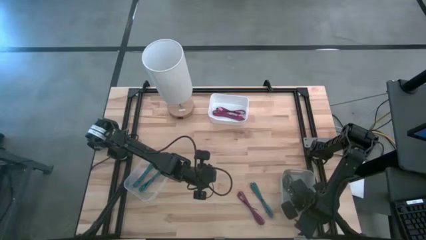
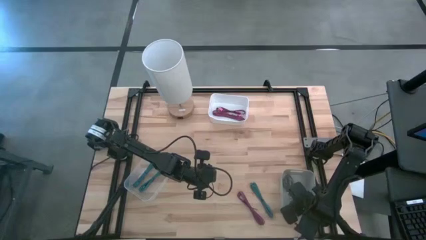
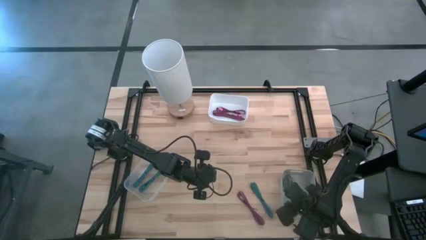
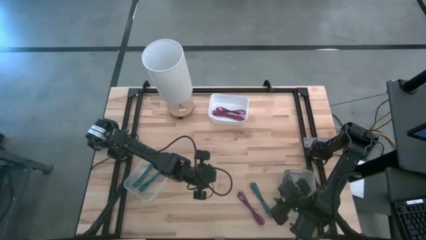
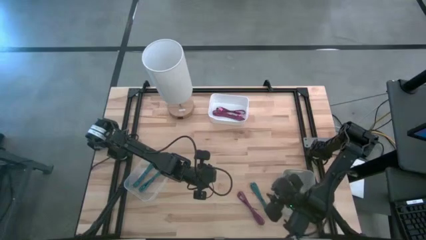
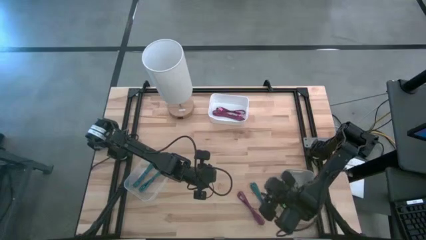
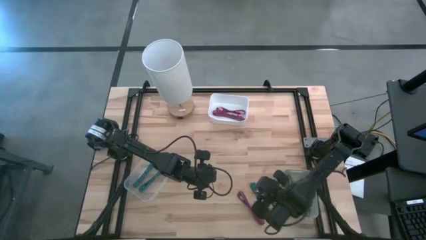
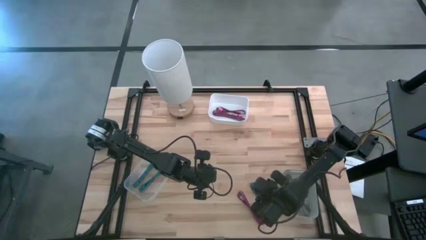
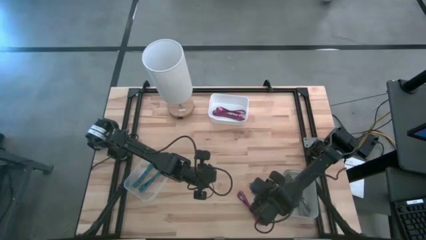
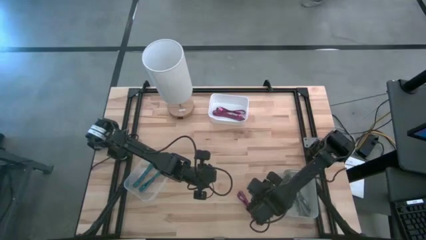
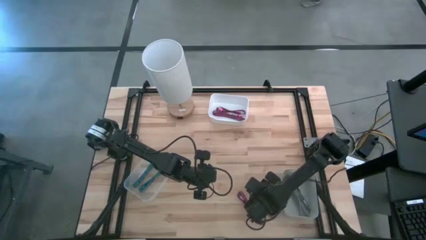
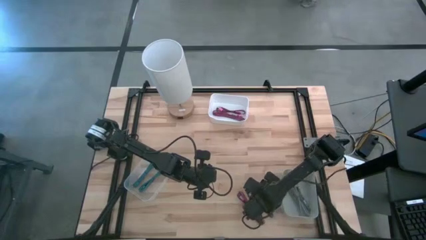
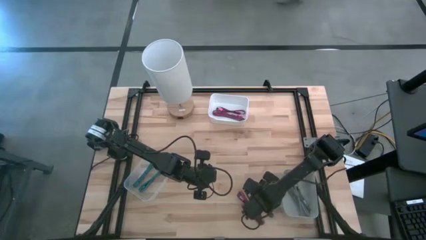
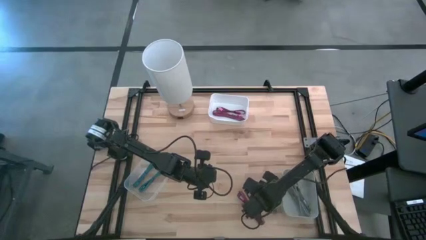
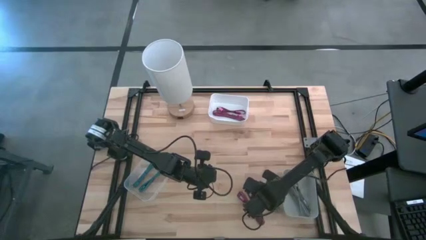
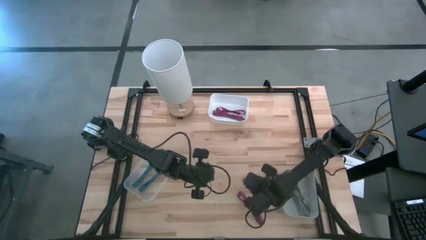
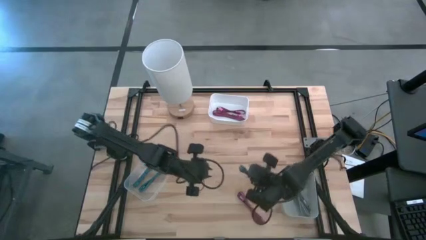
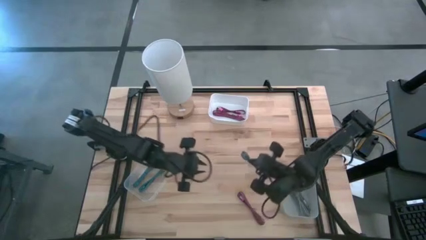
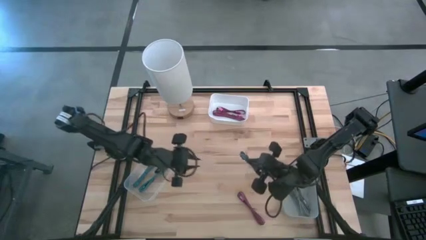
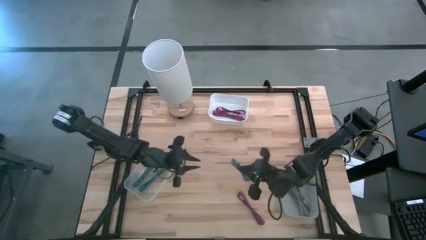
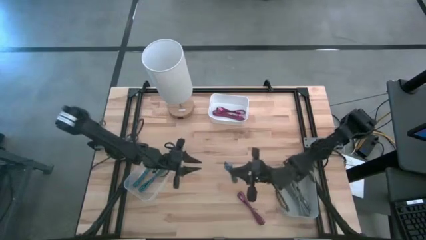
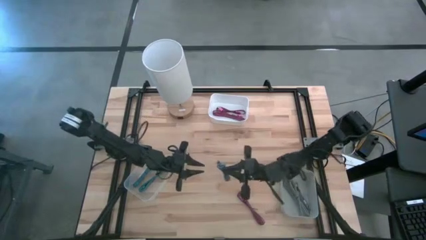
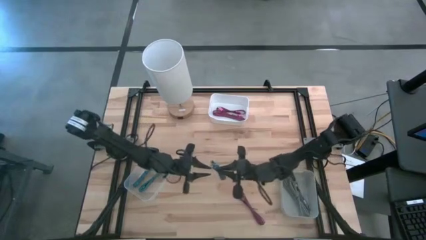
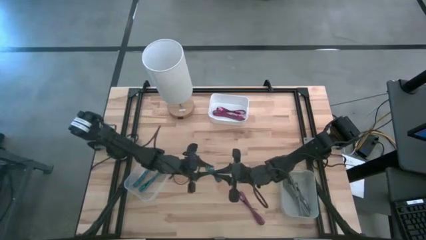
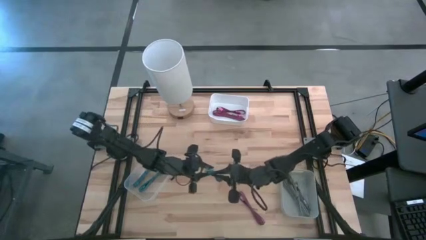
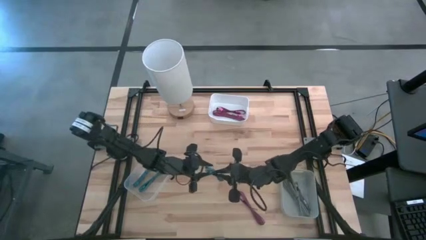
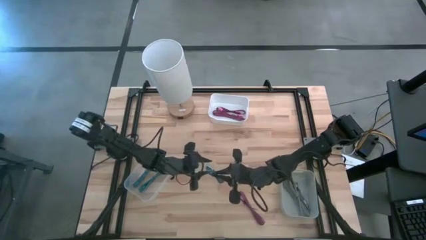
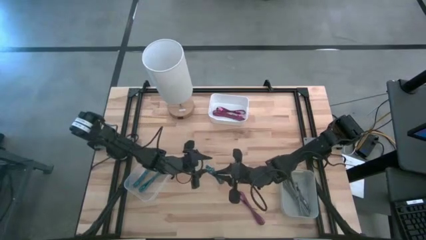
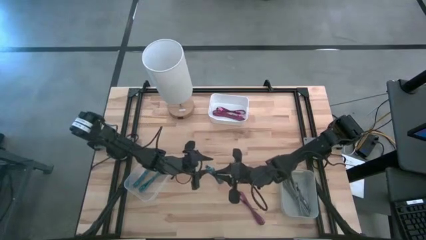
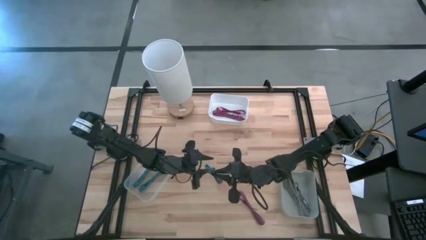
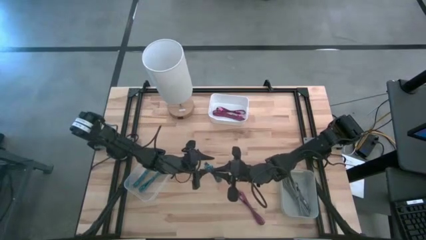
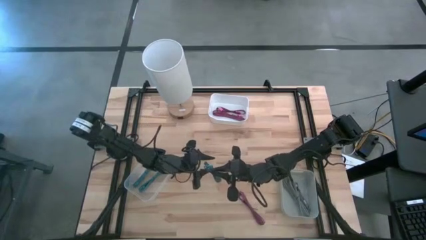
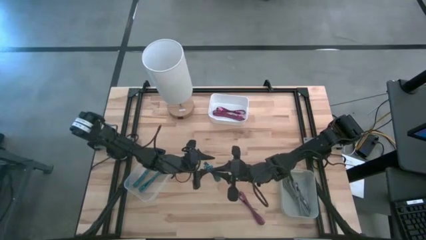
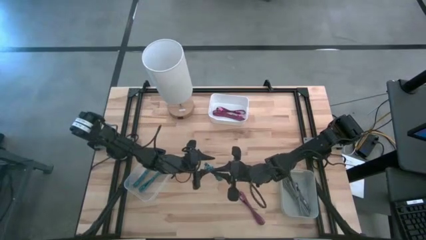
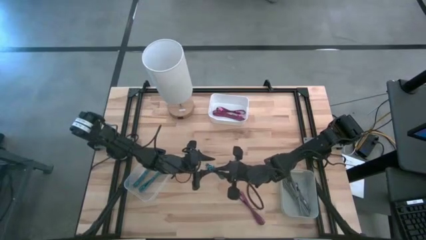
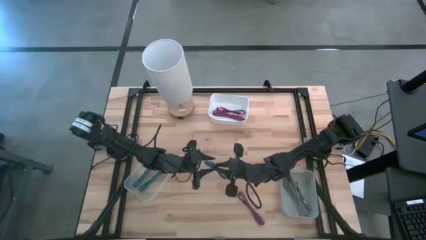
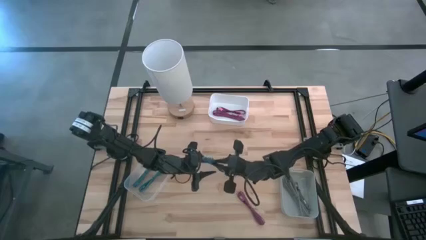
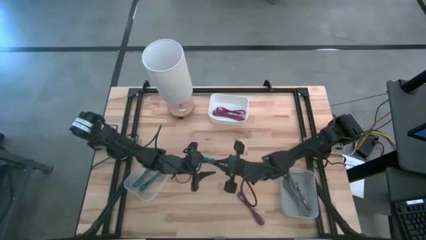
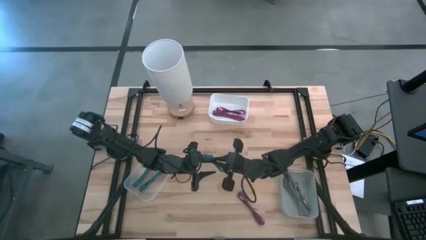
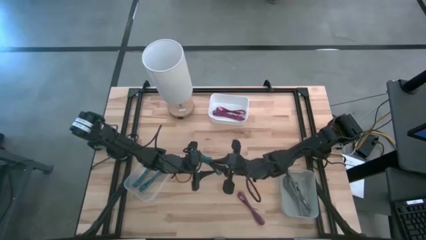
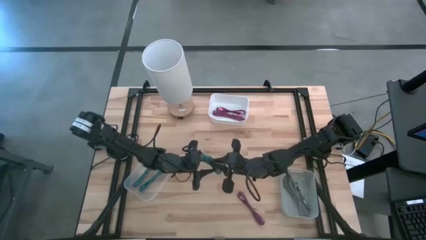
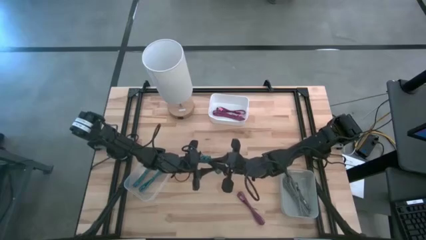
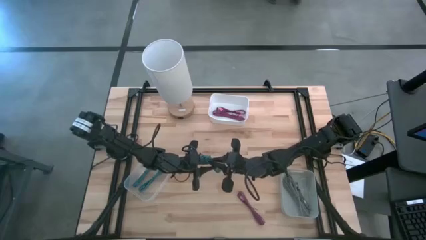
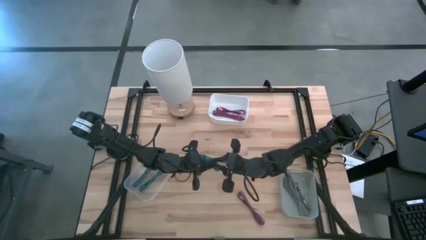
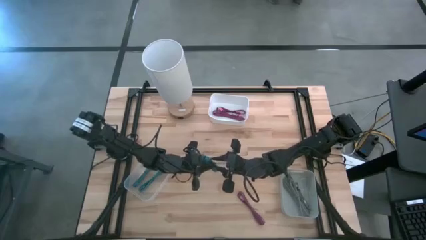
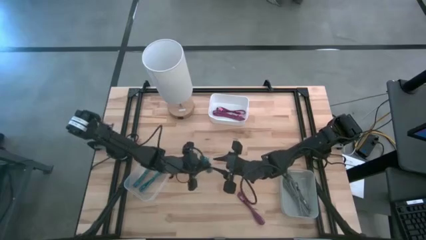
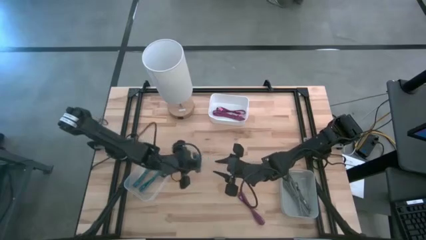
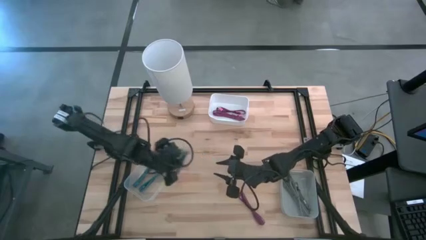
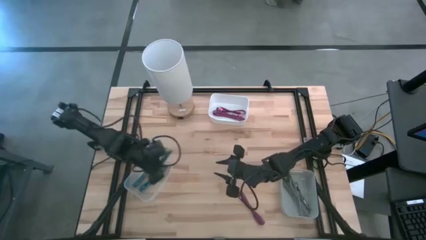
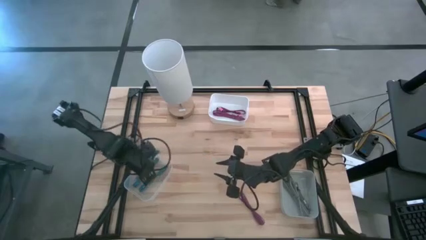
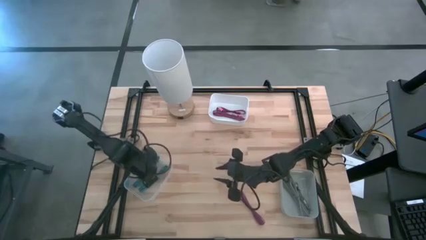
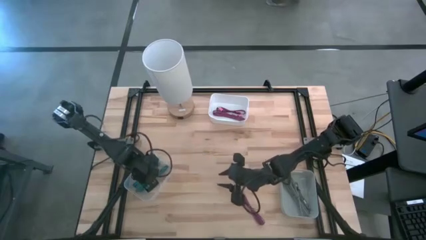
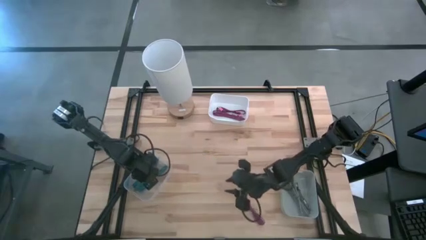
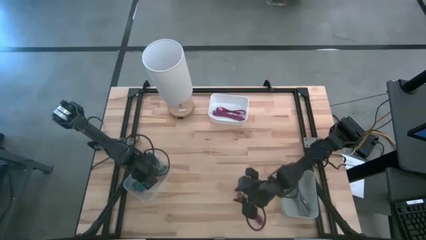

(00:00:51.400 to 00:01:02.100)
Task: Pick & Place USB Port
Put the blue charger cable into the transparent bin

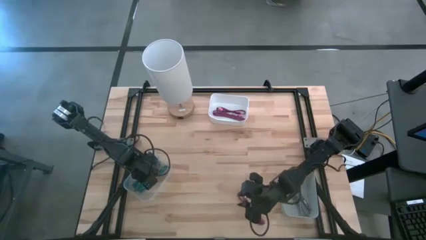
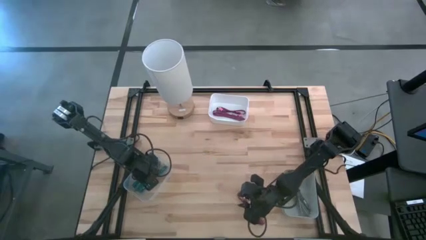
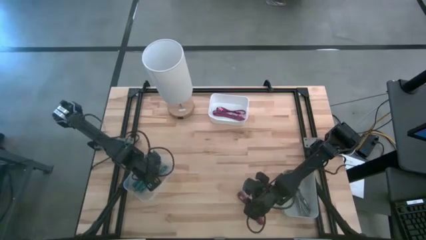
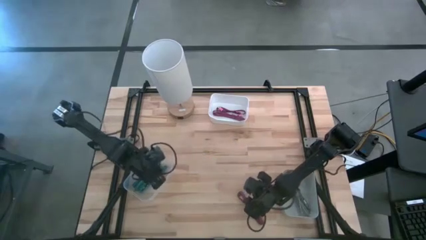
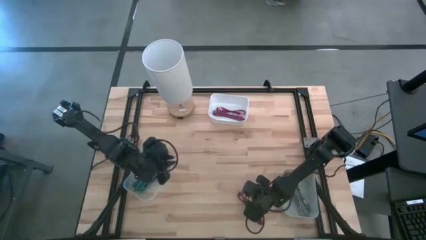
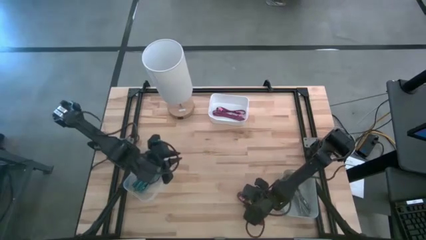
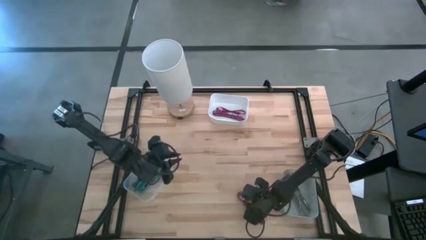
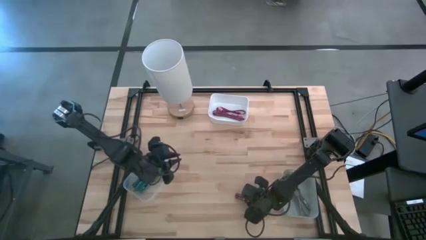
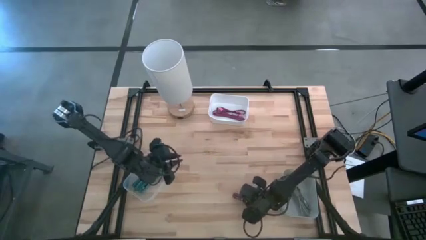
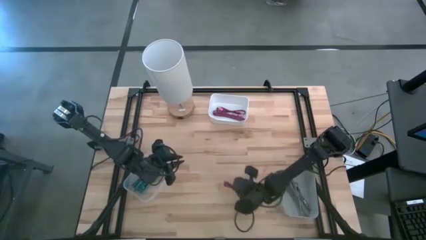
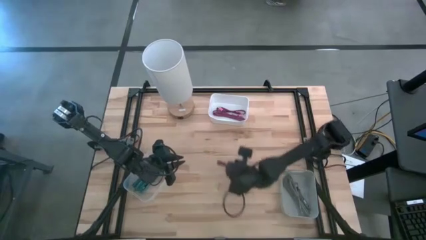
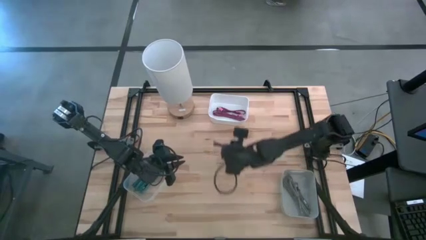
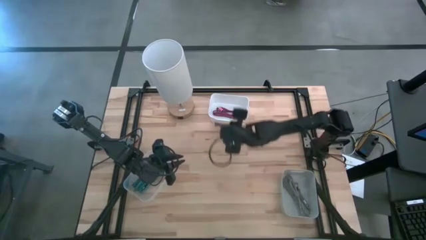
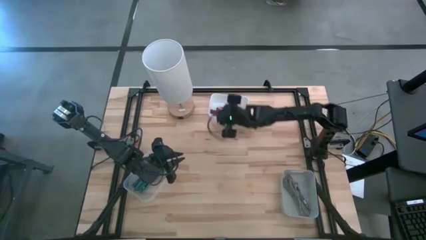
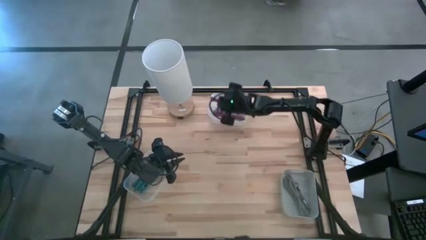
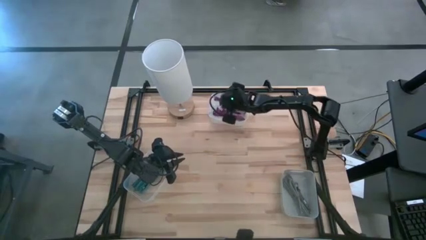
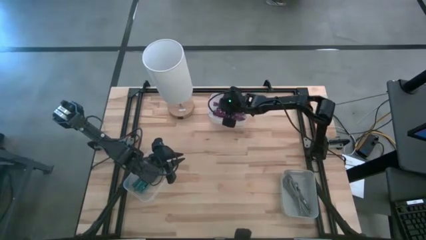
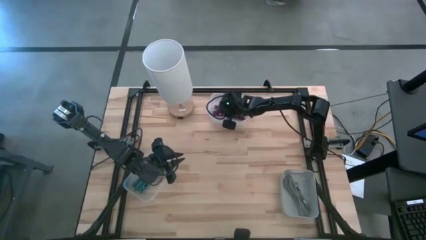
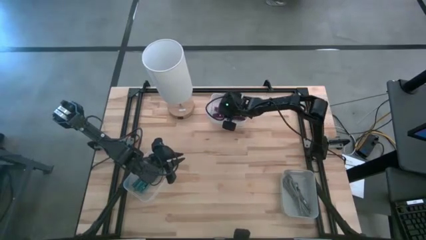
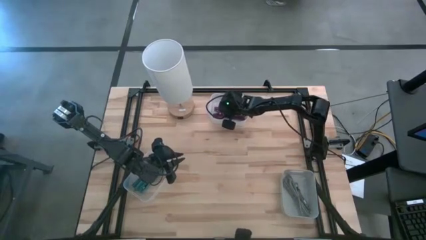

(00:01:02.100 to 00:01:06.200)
Put the pink charger cable into the white bin
